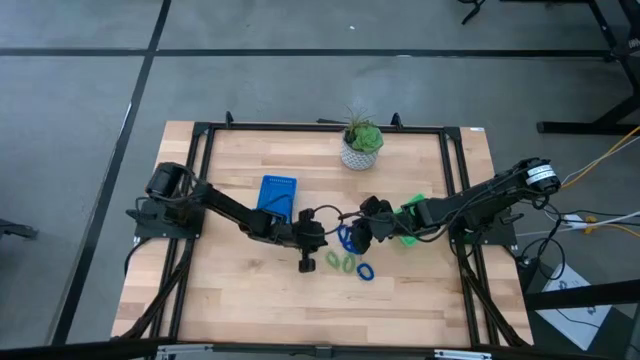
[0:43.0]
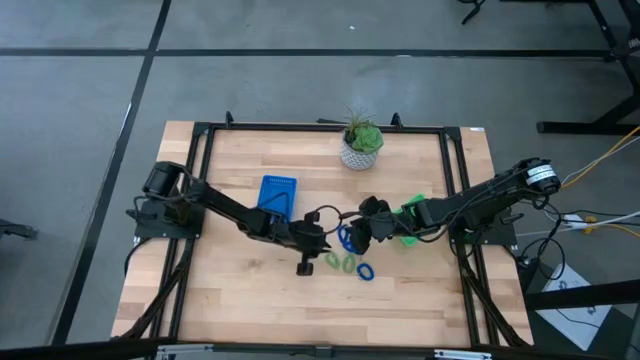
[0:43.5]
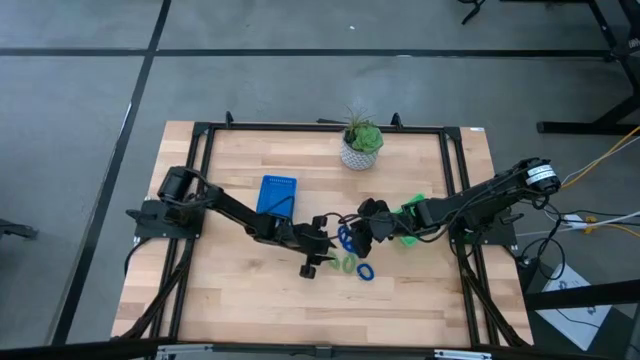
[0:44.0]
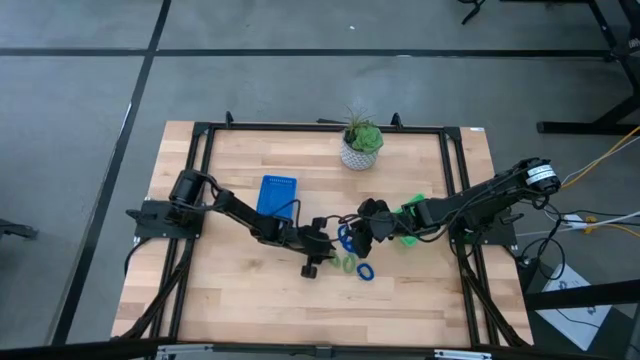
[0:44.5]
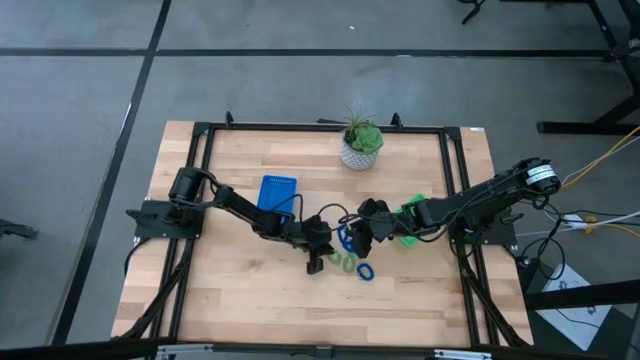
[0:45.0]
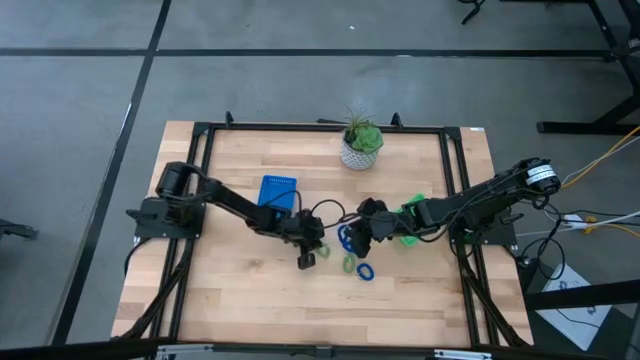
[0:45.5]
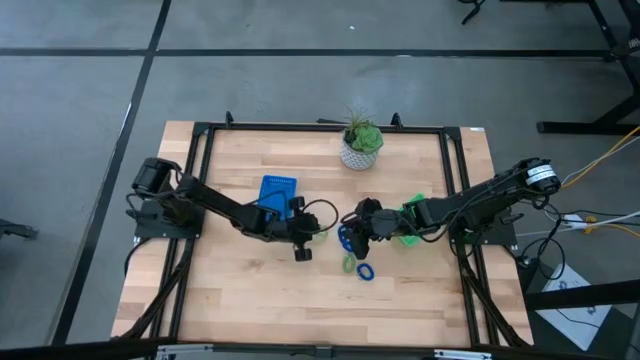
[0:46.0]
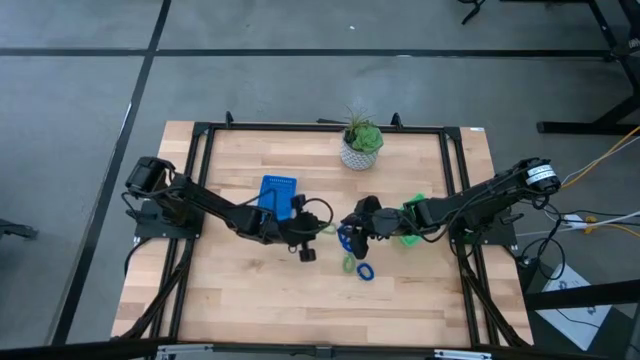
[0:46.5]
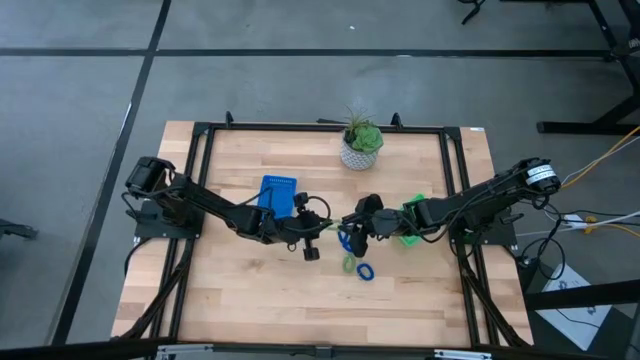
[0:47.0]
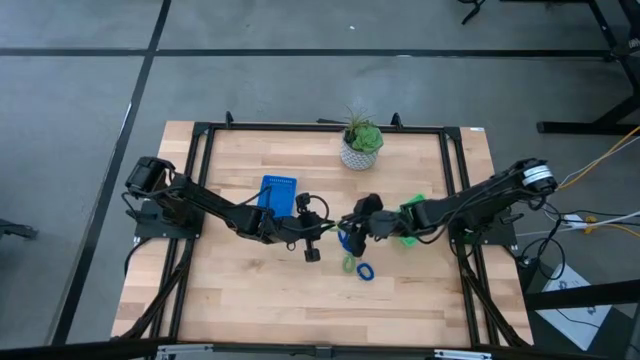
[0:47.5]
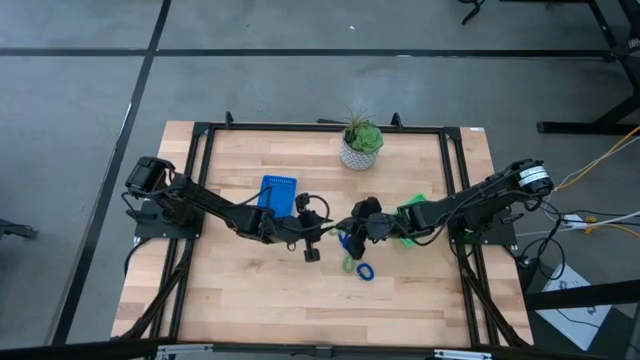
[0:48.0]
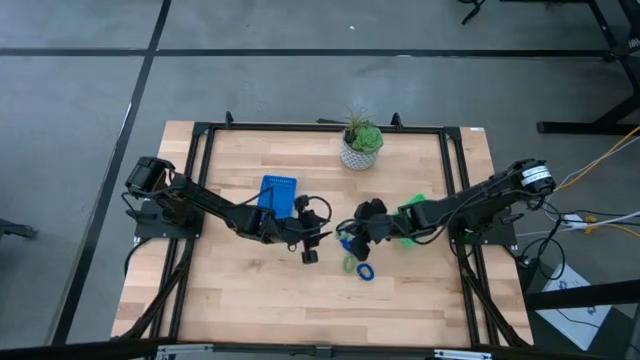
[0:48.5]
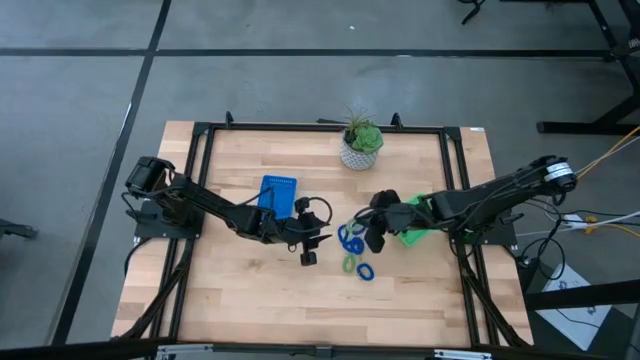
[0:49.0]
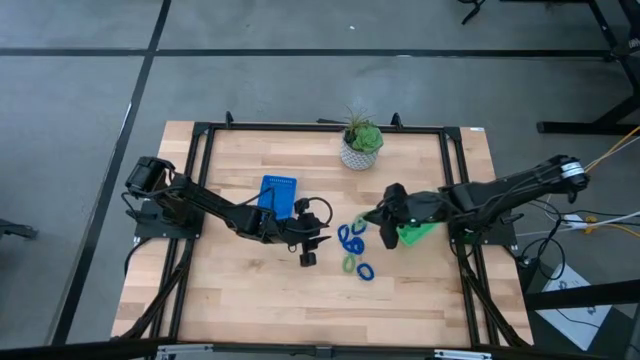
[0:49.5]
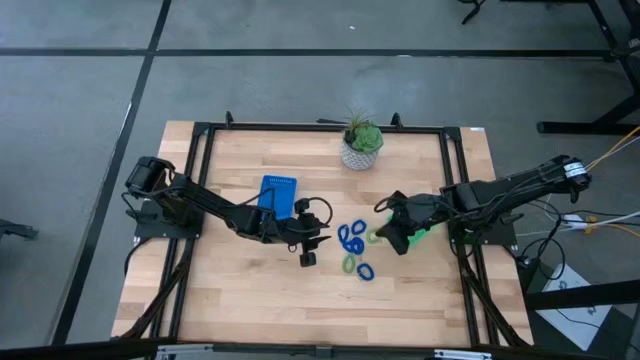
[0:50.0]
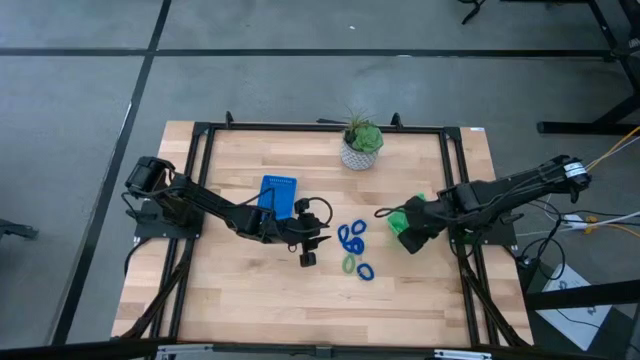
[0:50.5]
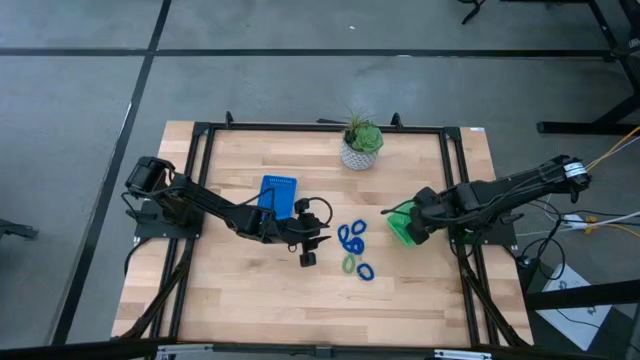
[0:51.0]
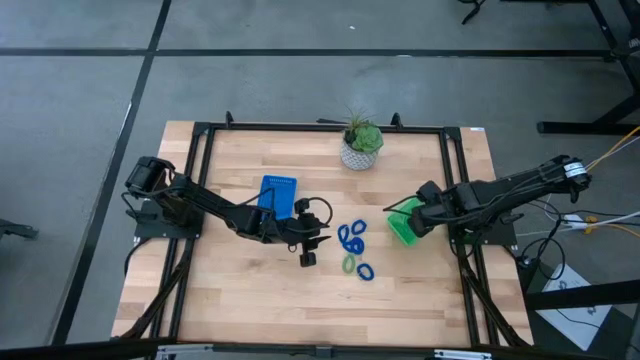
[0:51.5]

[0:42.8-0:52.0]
Task: Sort items
Put the green spring keychain into the green bin

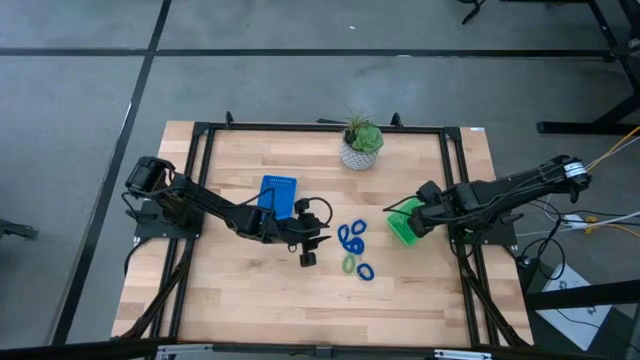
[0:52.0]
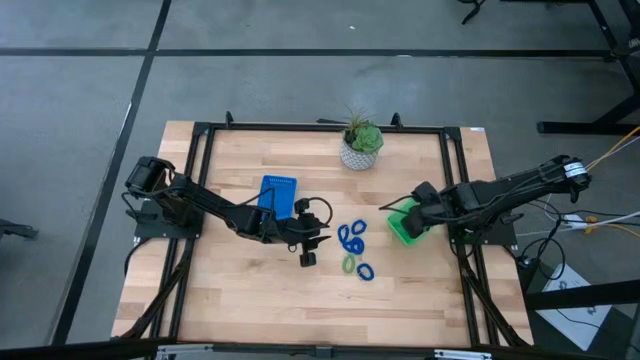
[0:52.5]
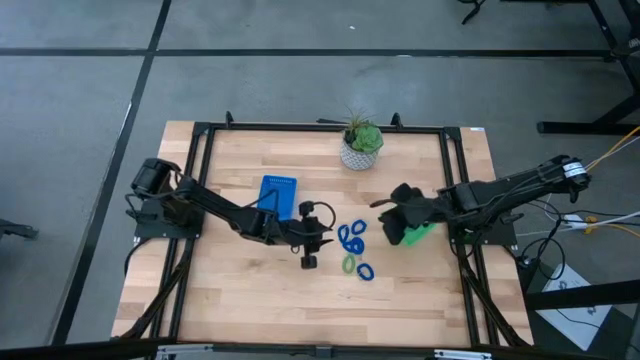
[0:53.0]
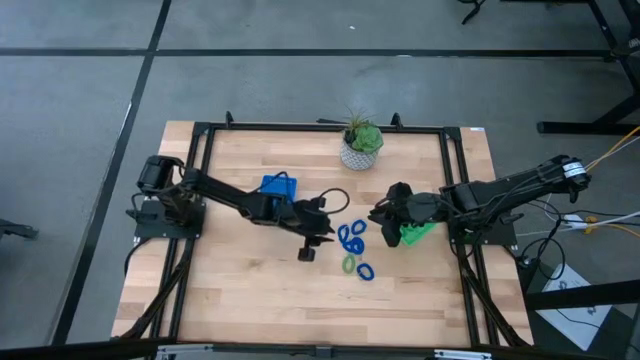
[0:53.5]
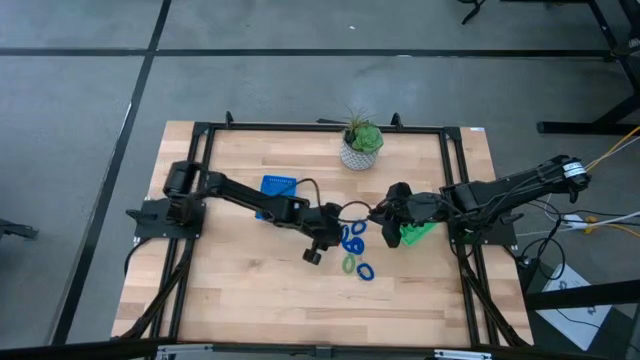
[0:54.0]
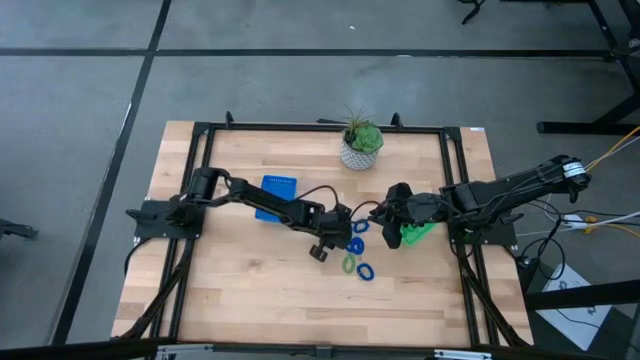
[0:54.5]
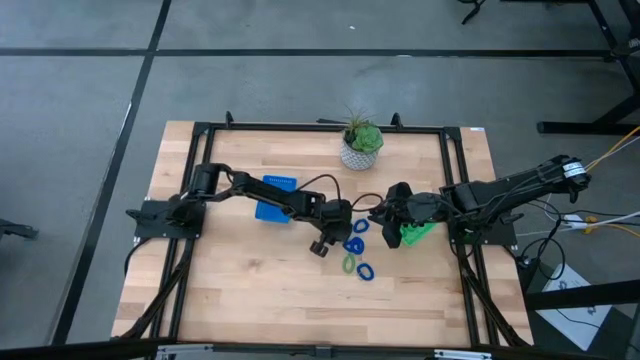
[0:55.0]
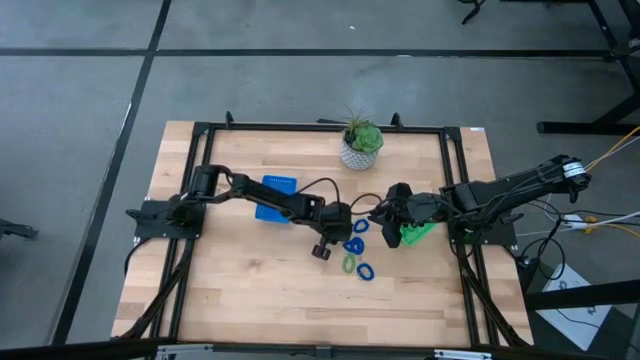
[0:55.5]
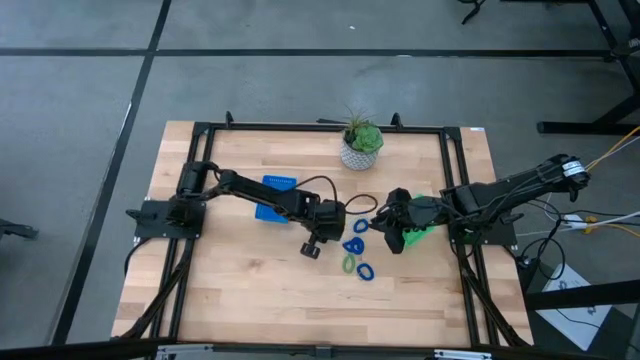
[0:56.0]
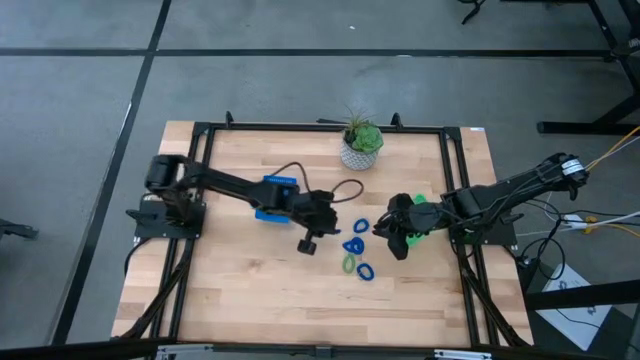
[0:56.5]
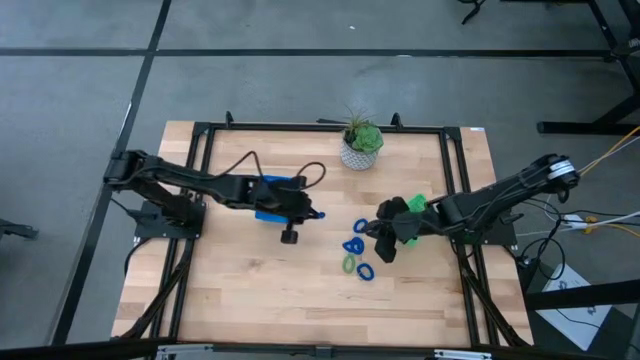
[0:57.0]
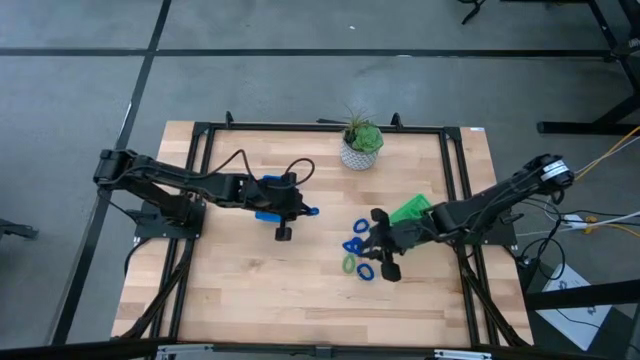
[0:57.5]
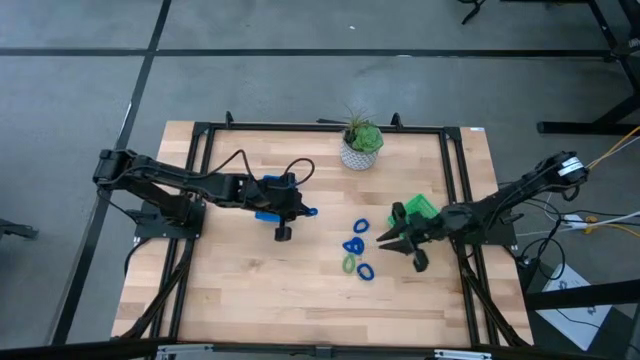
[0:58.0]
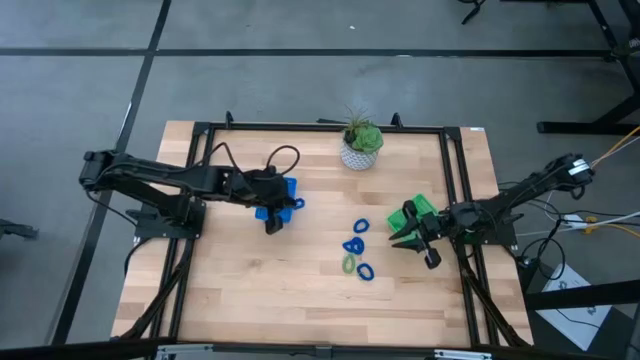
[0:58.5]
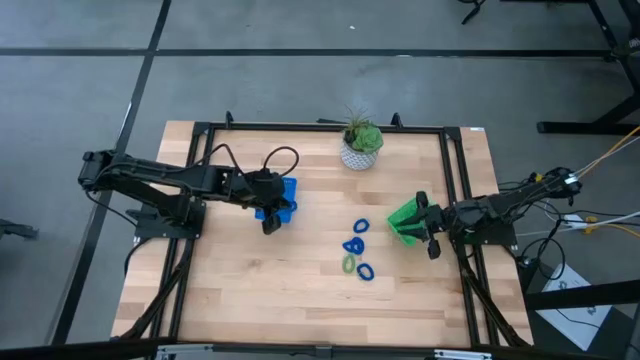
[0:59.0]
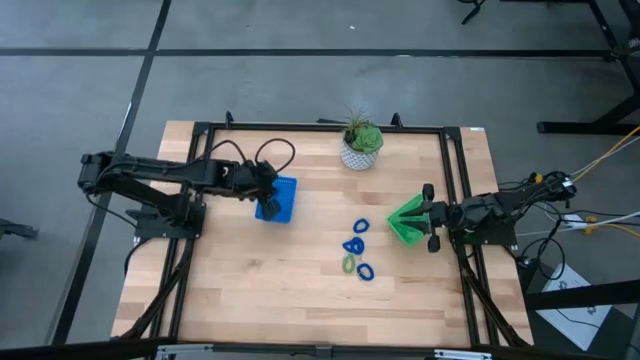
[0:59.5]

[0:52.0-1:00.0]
Put the blue spring keychain into the blue bin

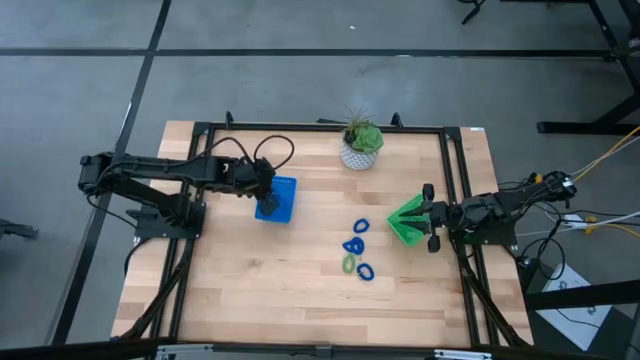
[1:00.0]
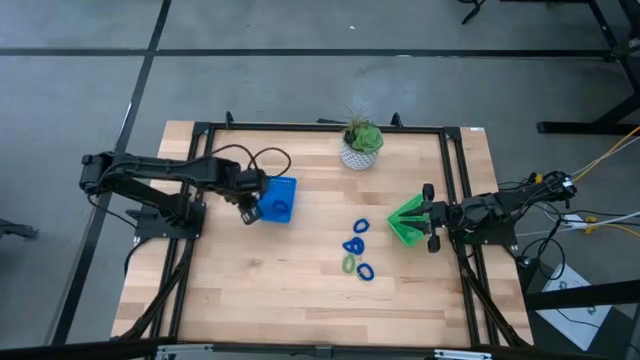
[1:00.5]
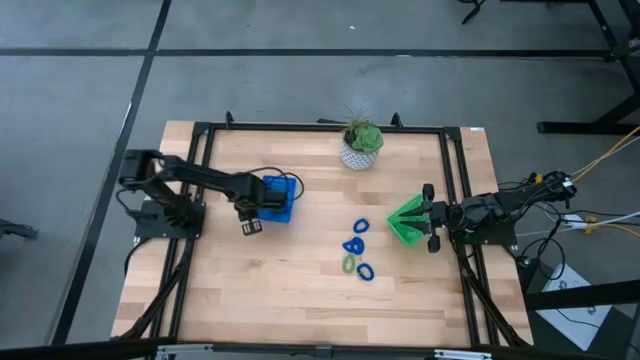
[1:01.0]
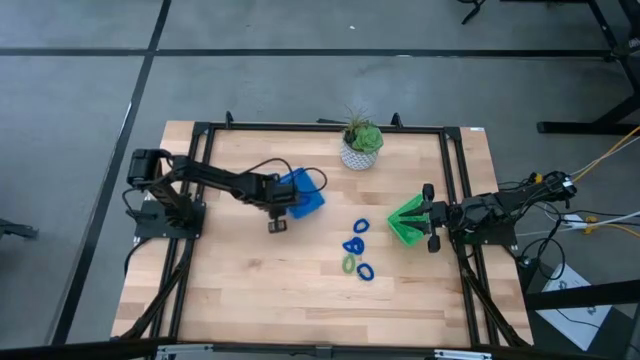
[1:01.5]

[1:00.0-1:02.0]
Move the blue bin to the top center of the table

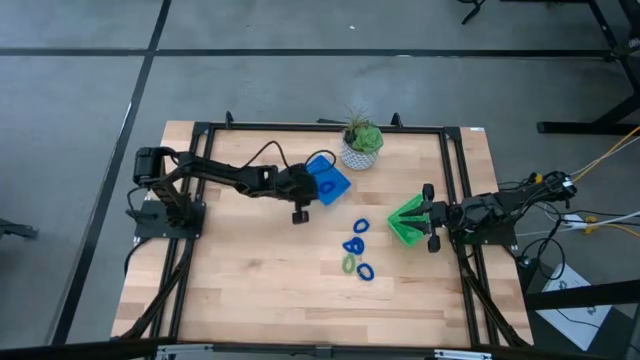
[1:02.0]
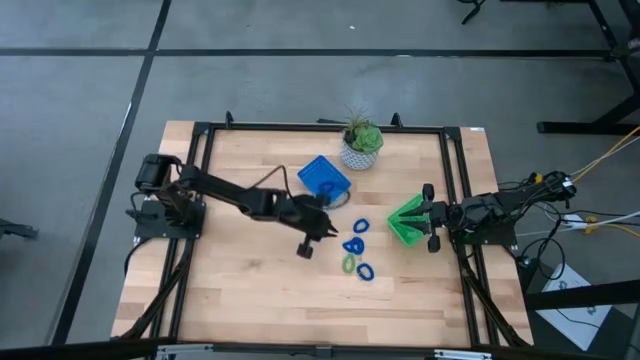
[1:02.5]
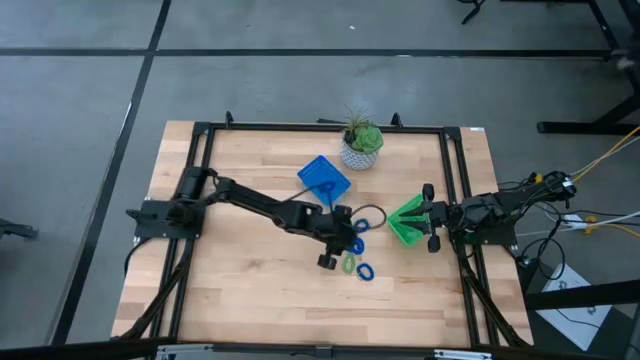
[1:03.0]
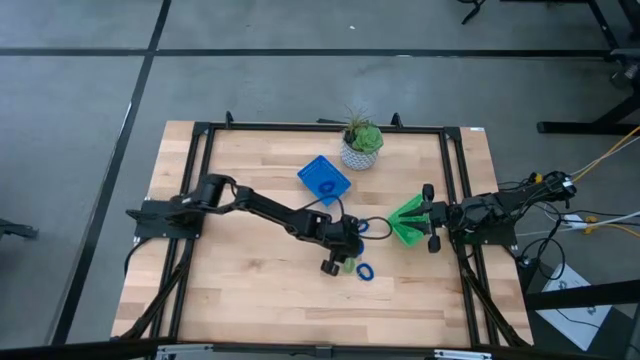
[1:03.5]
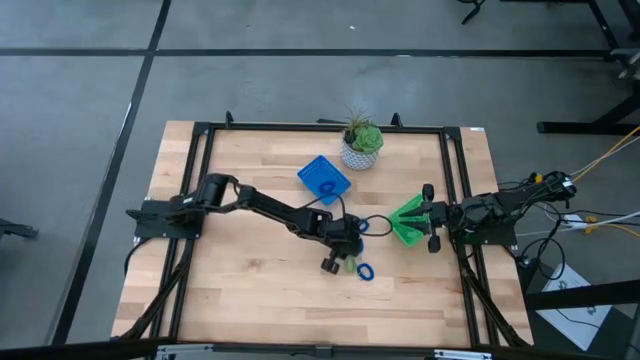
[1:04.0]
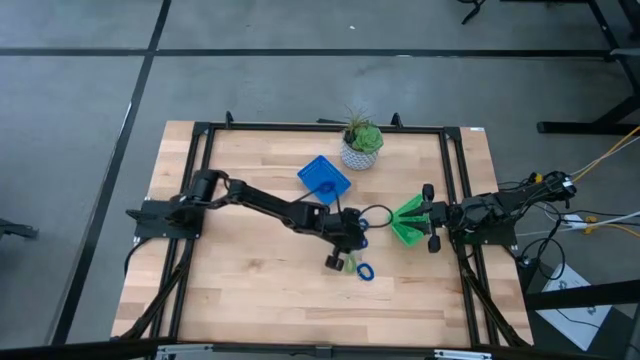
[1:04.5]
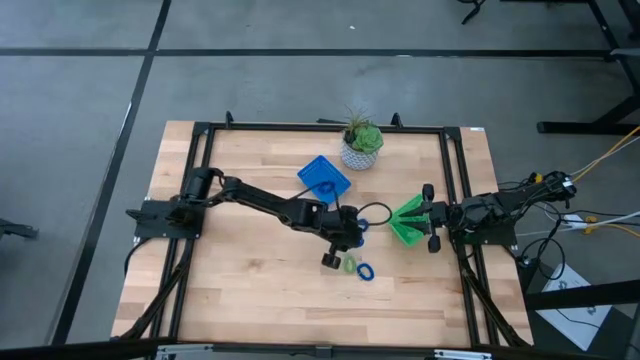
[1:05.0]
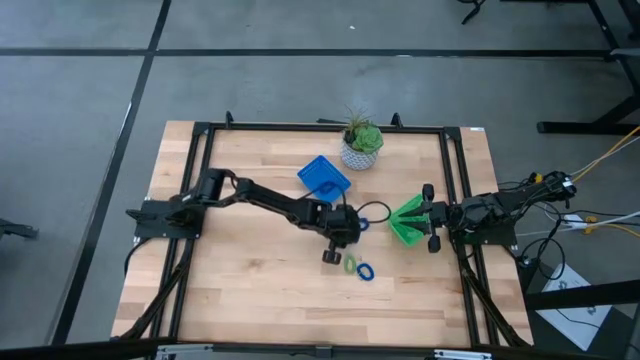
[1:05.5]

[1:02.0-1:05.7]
Put the blue spring keychain into the blue bin
